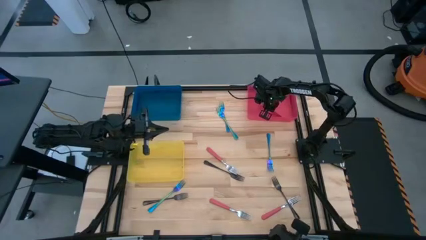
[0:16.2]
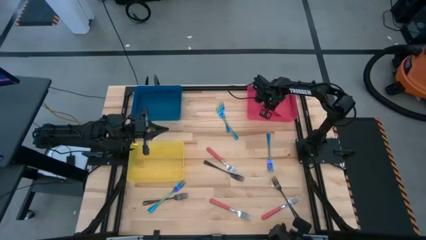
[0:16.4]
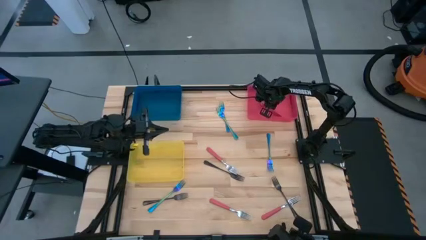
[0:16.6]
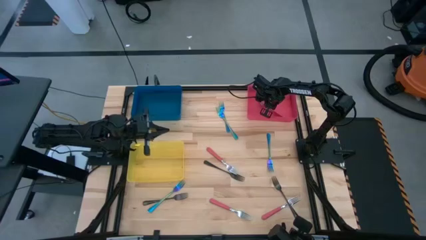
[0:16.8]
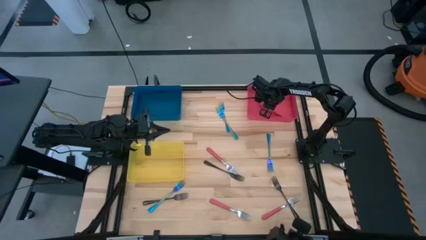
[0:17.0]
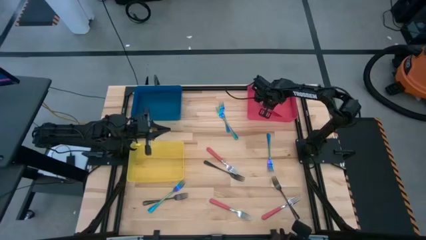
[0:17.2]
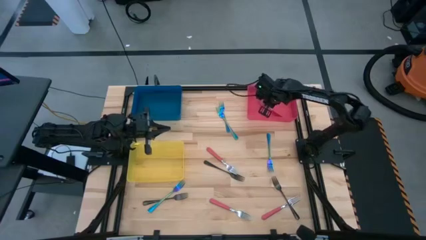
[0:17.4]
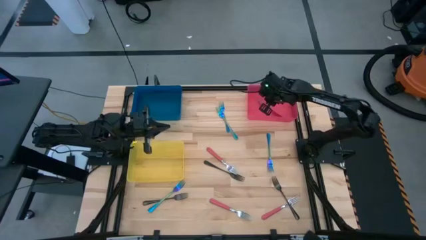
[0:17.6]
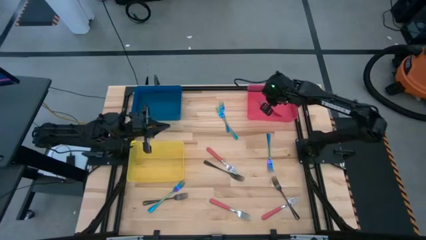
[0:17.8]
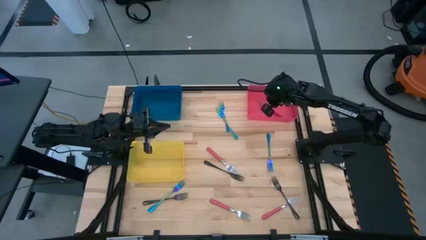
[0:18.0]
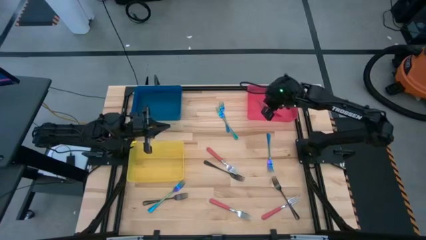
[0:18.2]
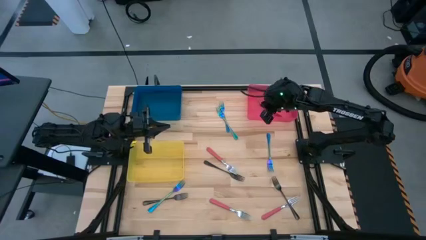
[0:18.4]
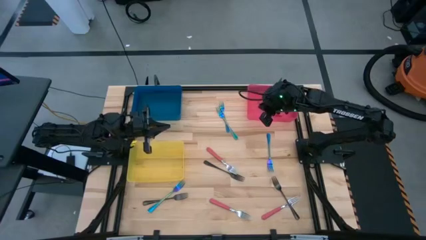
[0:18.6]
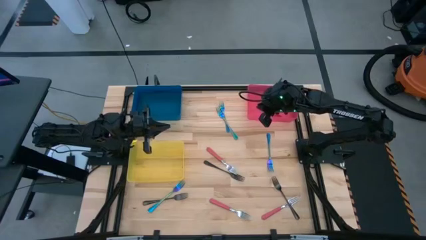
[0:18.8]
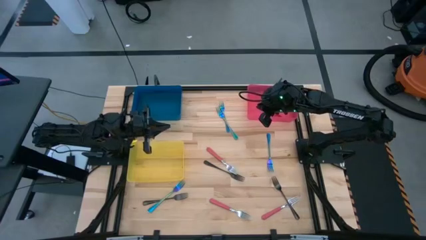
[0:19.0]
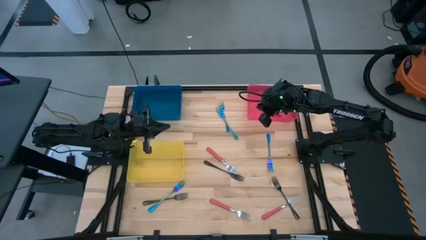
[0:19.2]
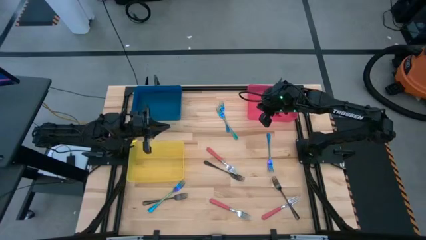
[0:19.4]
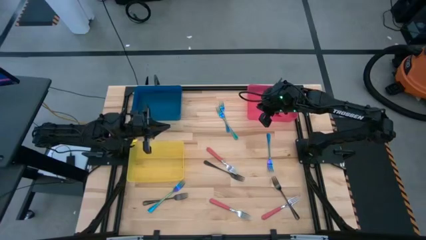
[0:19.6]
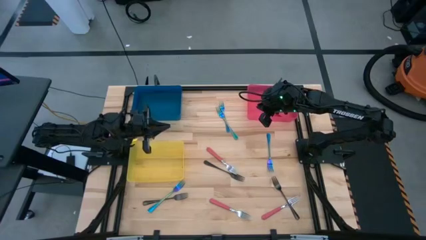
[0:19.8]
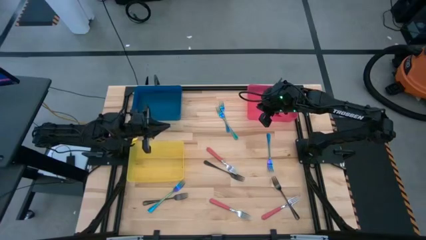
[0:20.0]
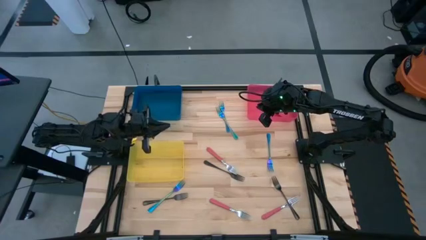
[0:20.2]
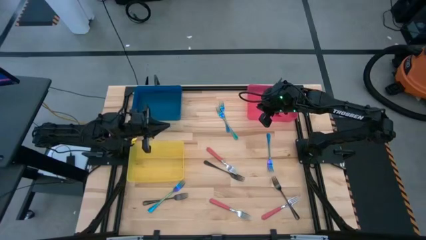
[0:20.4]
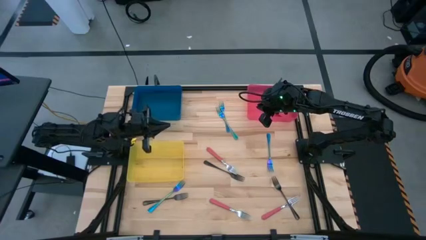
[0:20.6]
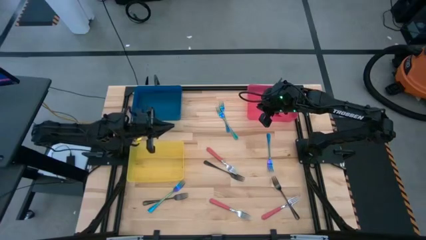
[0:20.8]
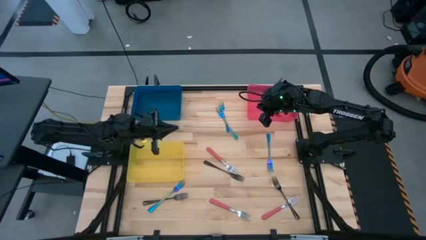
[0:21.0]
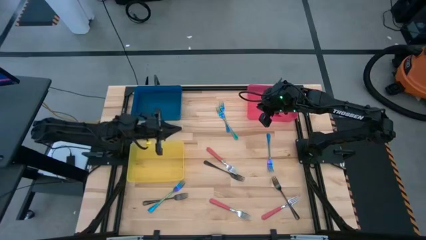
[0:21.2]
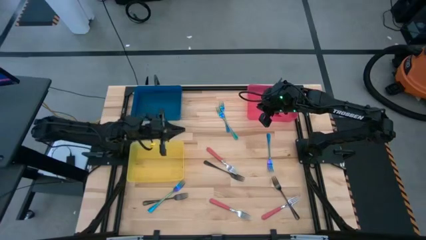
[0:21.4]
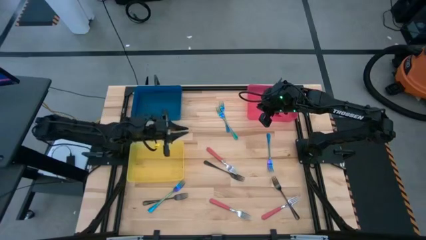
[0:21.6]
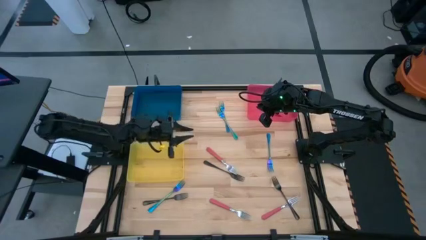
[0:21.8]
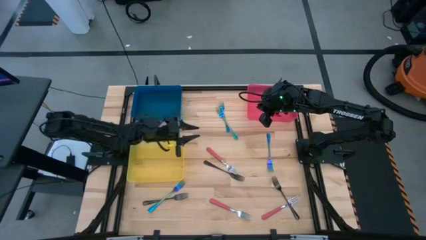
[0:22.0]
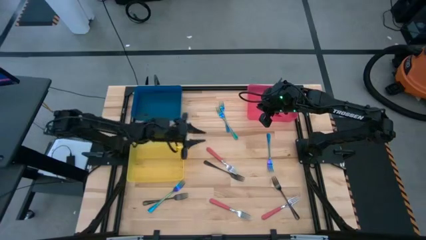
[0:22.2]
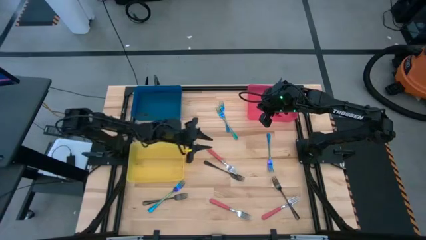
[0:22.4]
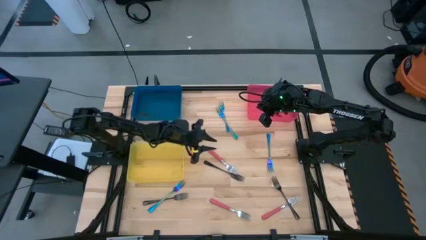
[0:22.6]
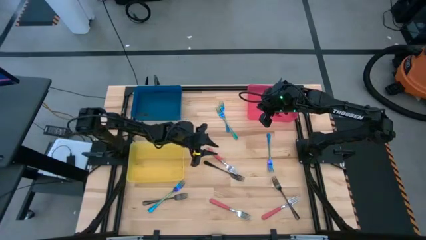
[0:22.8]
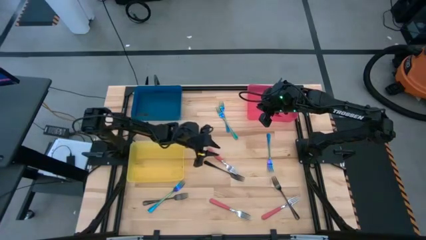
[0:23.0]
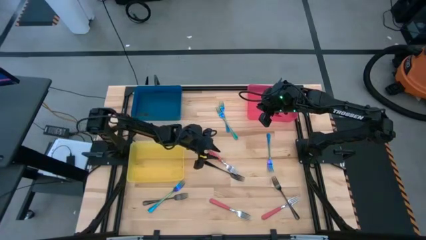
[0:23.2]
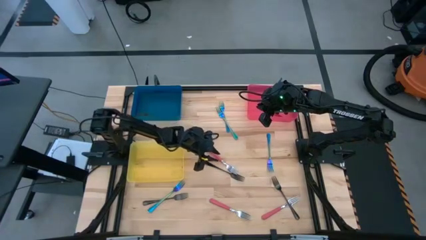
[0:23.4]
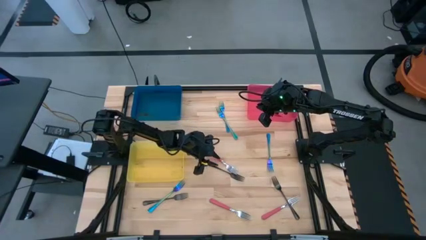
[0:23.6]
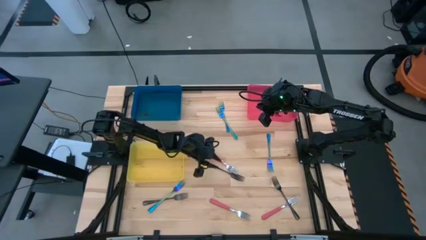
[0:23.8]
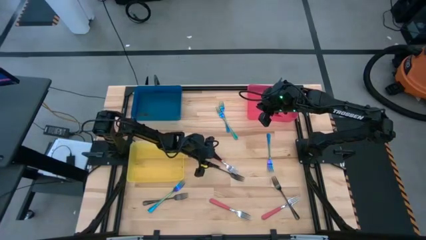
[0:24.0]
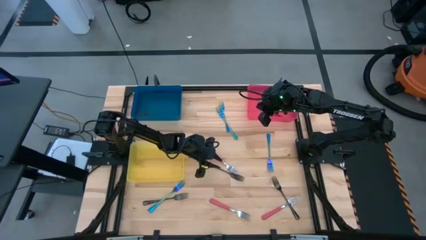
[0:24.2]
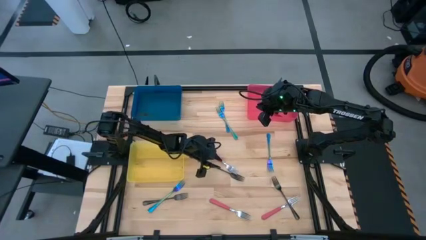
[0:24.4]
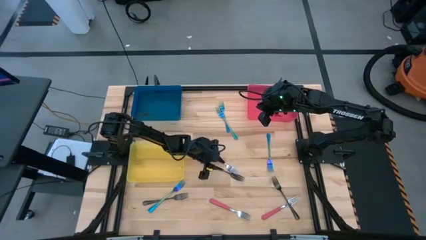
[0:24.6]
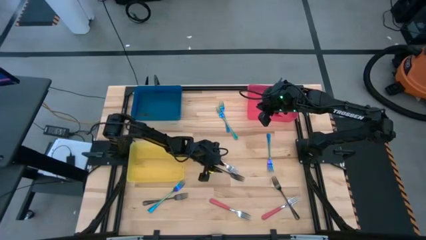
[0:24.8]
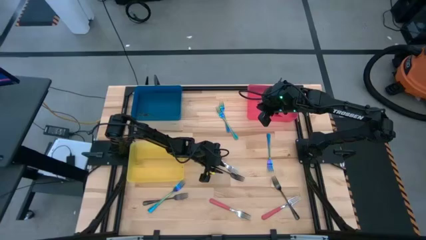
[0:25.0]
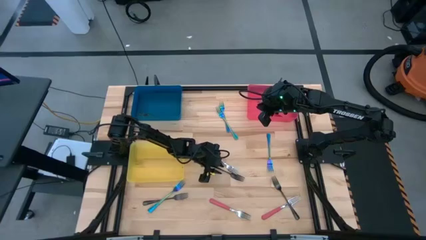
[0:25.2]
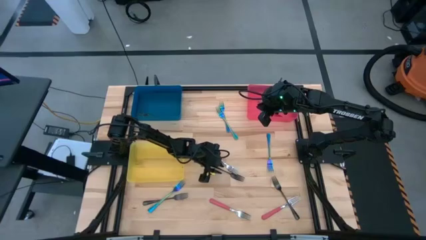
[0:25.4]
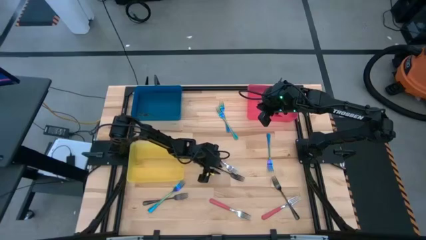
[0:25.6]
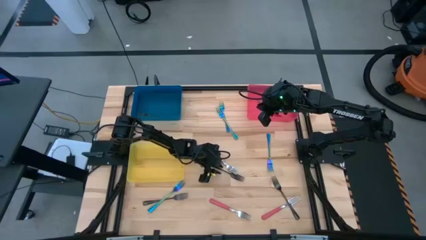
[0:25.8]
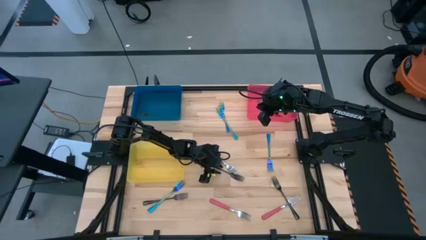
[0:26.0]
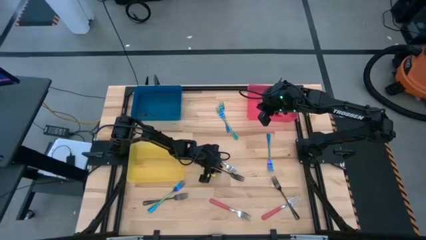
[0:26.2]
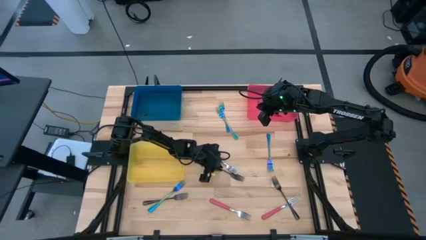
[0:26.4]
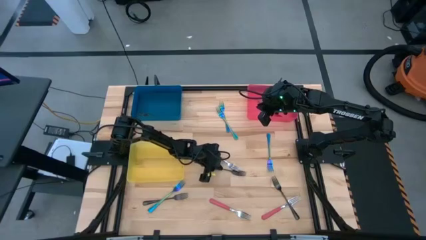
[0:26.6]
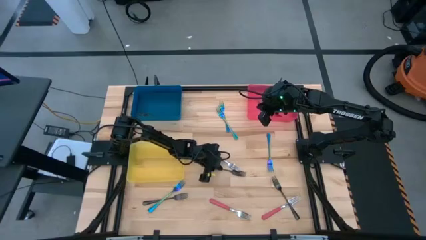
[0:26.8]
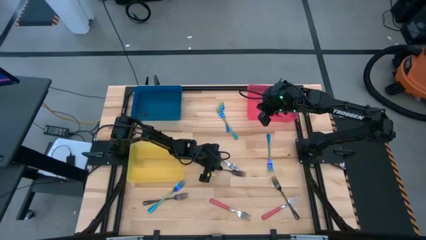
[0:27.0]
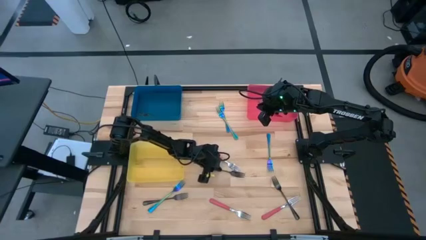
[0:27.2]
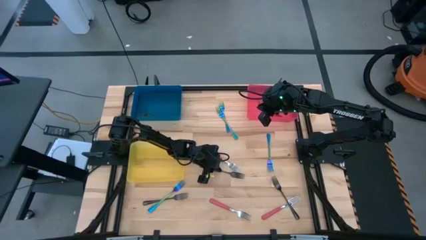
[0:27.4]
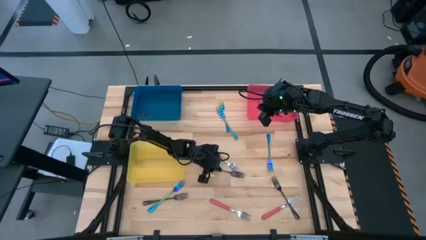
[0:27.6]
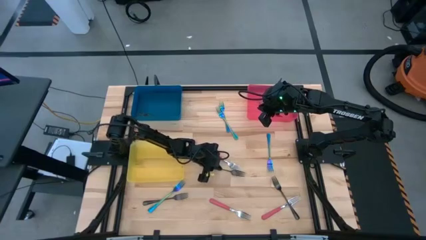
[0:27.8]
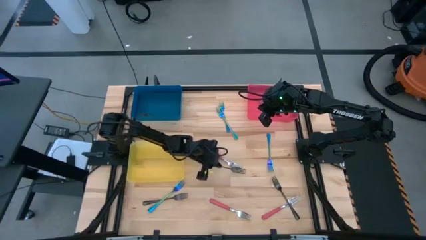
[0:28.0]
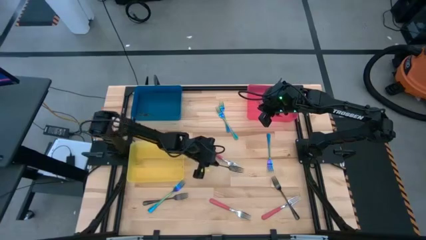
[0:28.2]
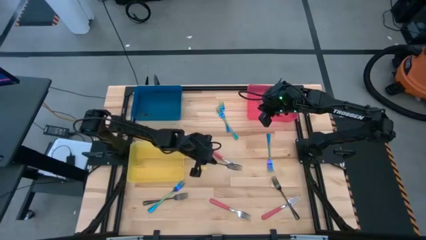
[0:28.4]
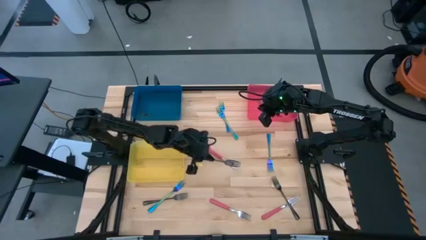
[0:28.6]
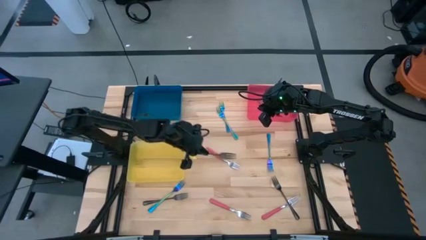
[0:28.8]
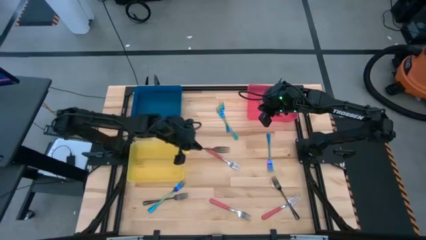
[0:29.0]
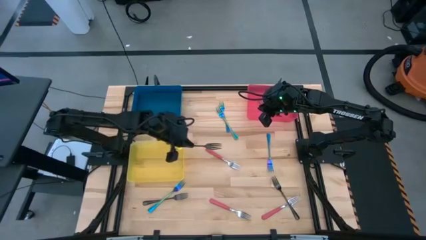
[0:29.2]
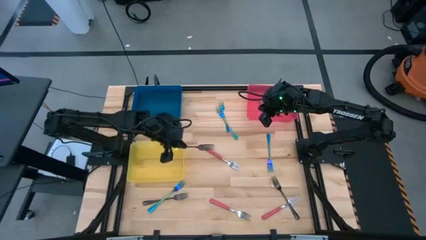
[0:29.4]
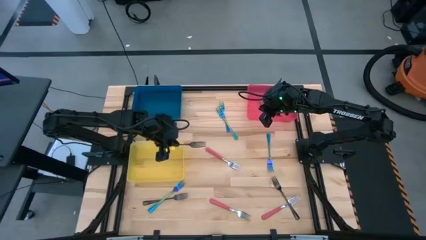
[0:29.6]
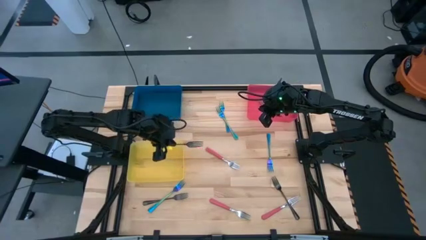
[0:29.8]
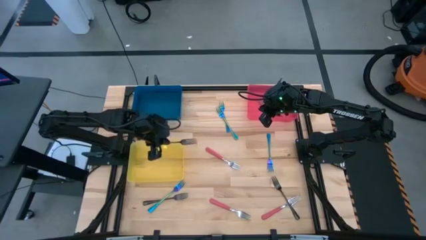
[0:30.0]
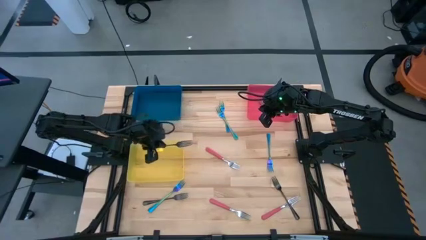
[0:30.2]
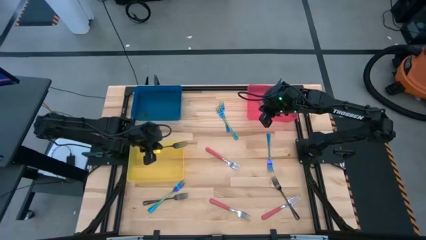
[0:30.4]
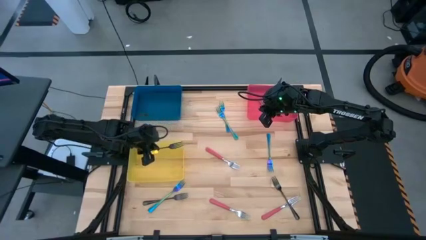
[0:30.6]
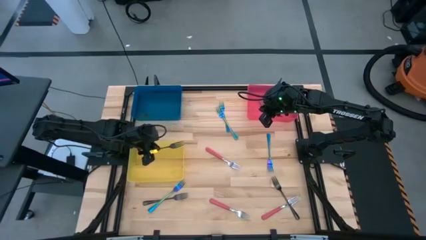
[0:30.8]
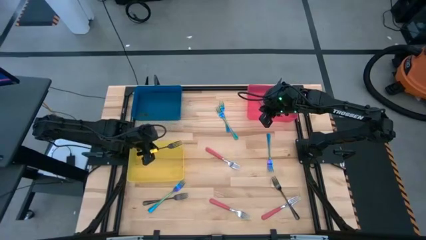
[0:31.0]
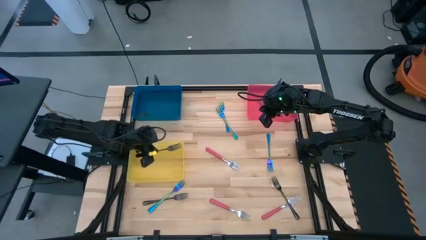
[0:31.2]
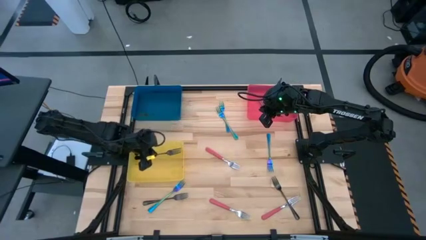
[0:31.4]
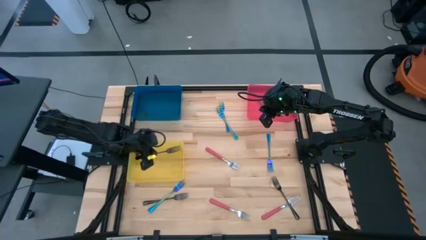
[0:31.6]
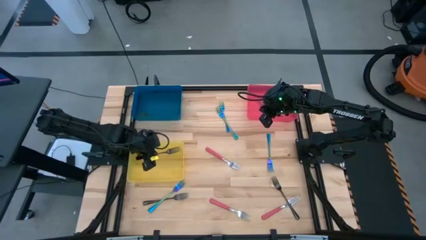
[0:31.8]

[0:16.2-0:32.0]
Task: Sort silverware by color (type)
Put the black fork into the yellow bin
